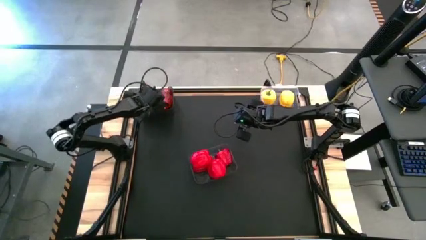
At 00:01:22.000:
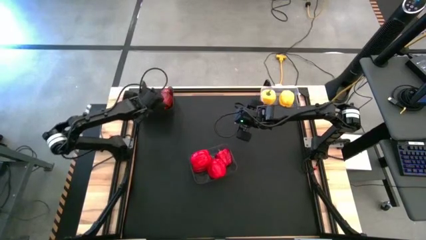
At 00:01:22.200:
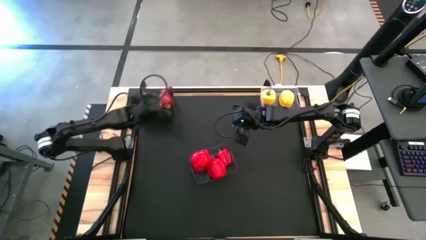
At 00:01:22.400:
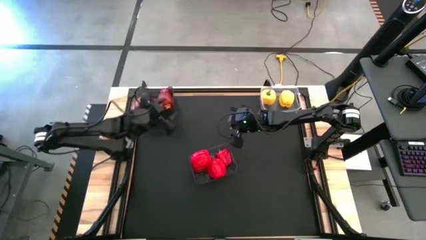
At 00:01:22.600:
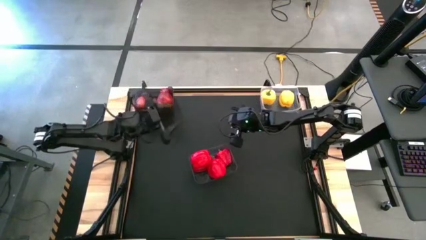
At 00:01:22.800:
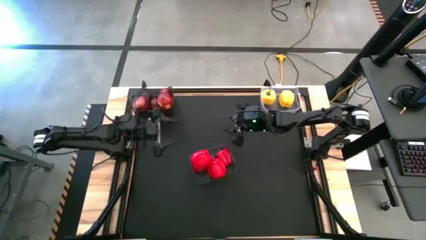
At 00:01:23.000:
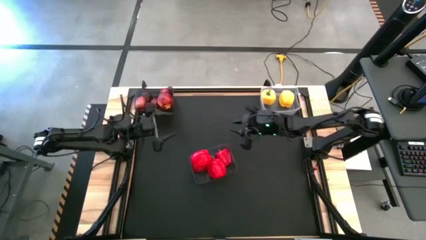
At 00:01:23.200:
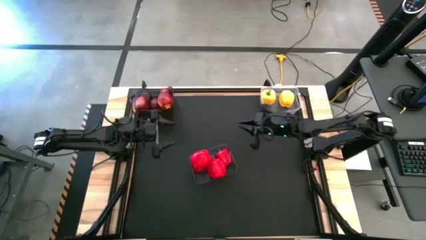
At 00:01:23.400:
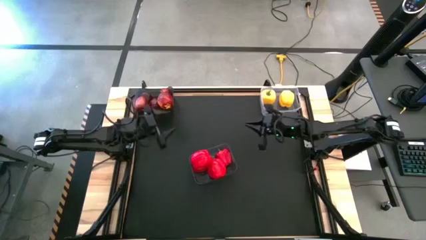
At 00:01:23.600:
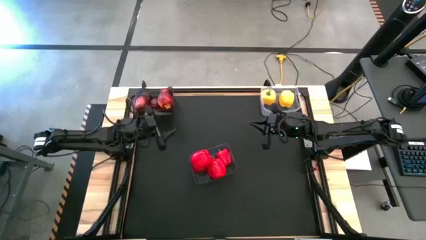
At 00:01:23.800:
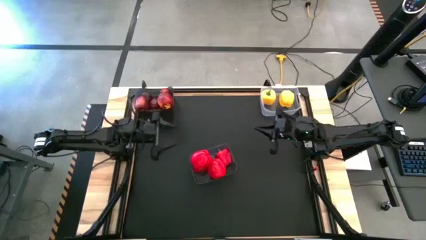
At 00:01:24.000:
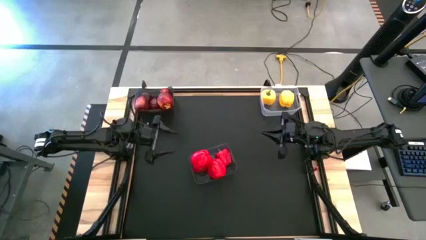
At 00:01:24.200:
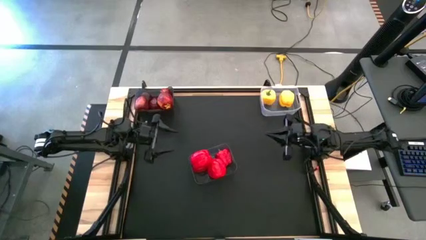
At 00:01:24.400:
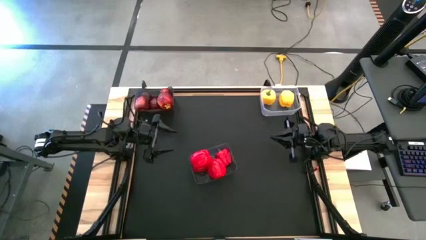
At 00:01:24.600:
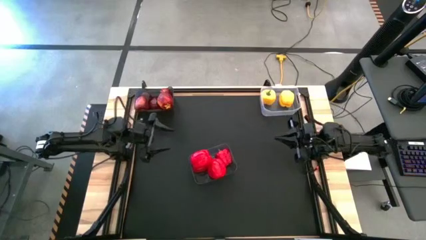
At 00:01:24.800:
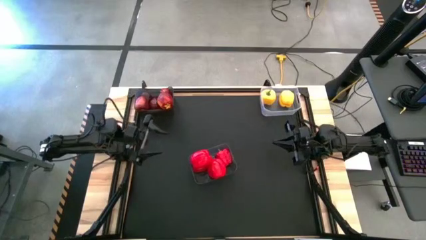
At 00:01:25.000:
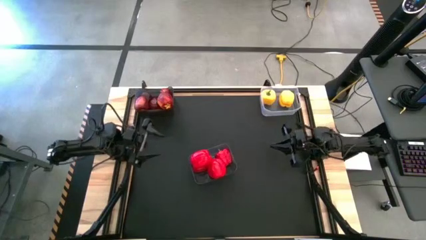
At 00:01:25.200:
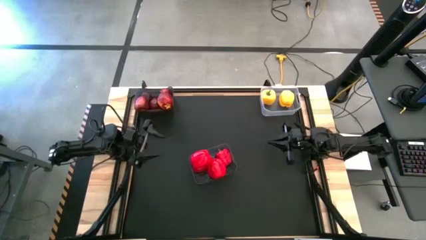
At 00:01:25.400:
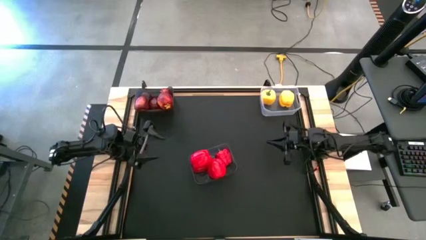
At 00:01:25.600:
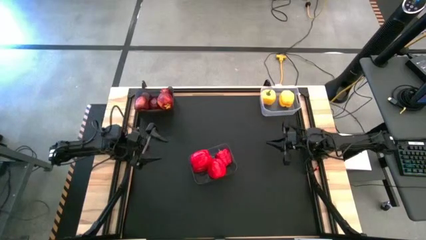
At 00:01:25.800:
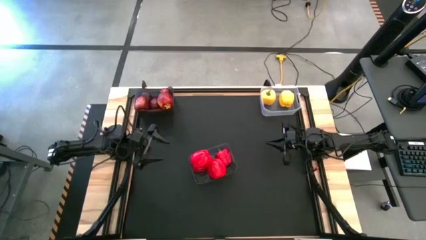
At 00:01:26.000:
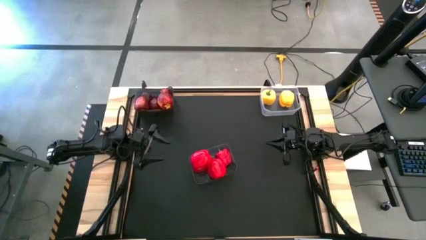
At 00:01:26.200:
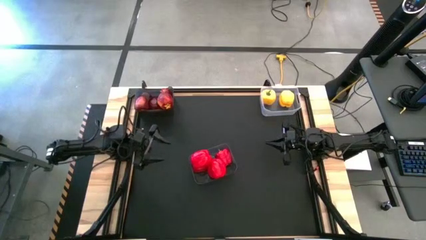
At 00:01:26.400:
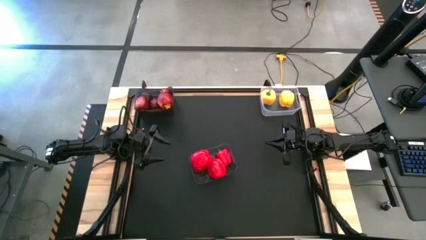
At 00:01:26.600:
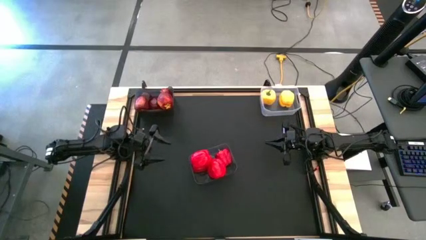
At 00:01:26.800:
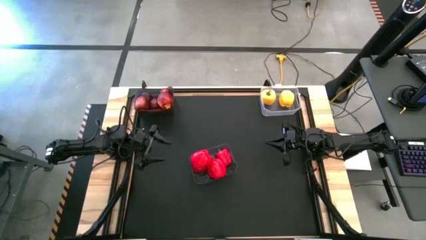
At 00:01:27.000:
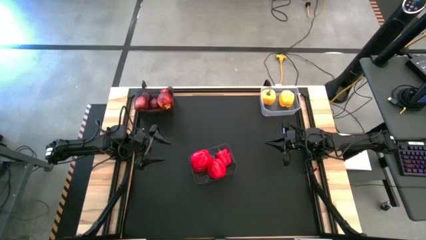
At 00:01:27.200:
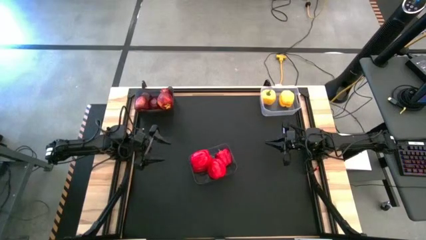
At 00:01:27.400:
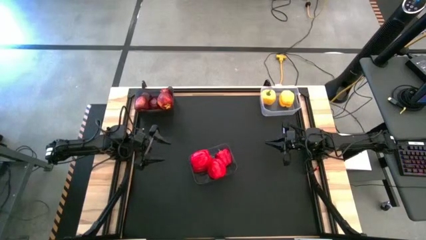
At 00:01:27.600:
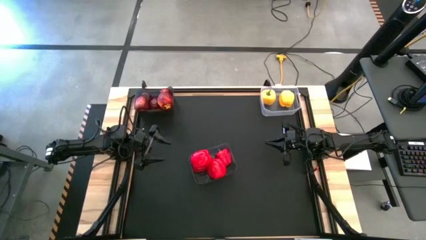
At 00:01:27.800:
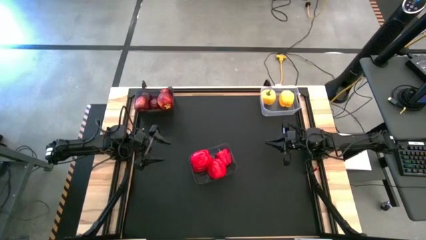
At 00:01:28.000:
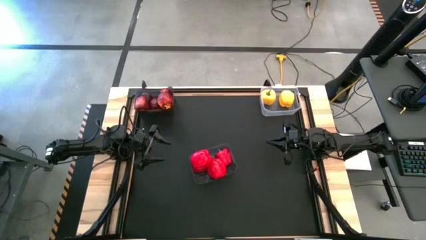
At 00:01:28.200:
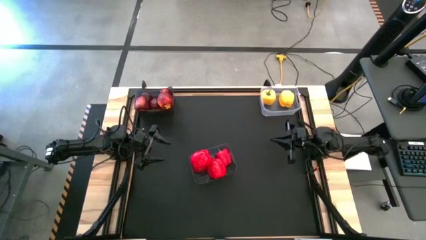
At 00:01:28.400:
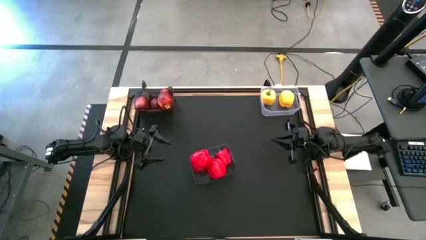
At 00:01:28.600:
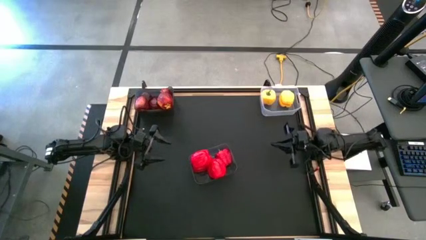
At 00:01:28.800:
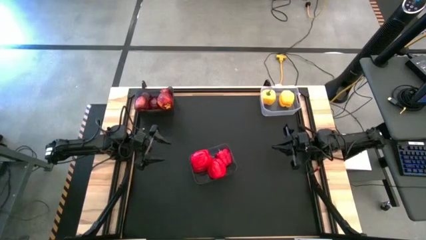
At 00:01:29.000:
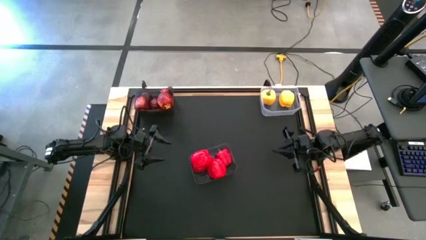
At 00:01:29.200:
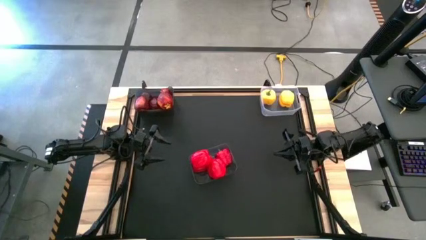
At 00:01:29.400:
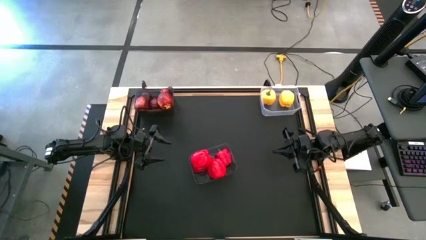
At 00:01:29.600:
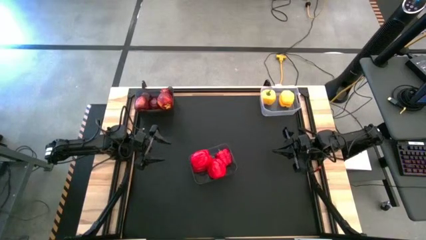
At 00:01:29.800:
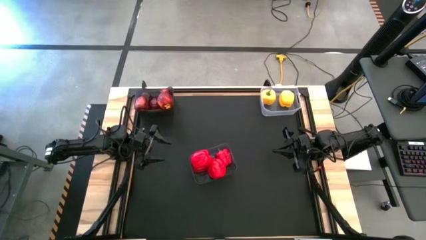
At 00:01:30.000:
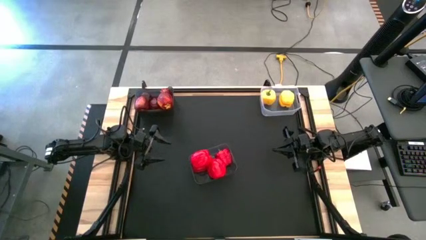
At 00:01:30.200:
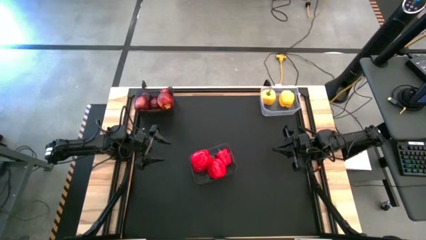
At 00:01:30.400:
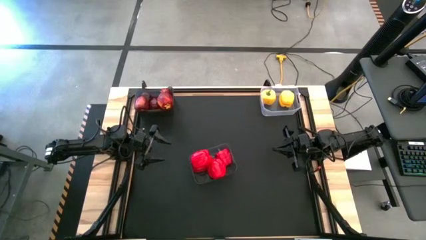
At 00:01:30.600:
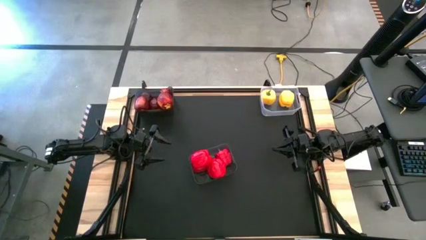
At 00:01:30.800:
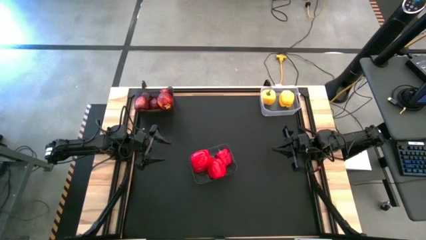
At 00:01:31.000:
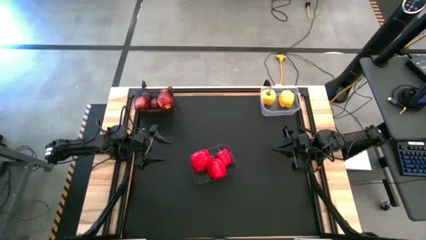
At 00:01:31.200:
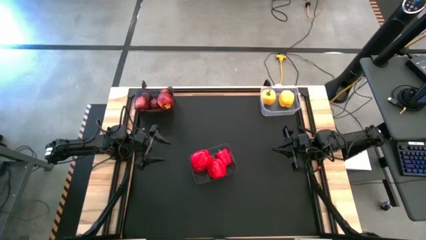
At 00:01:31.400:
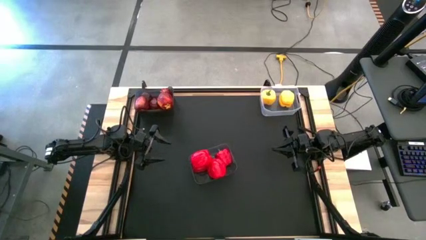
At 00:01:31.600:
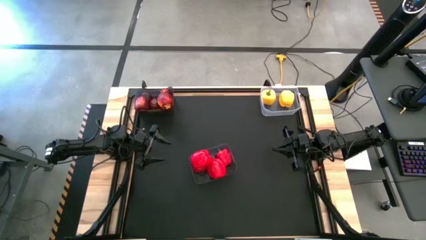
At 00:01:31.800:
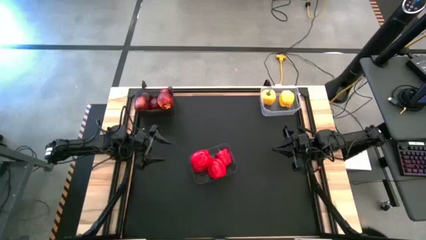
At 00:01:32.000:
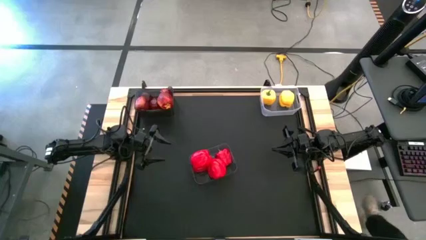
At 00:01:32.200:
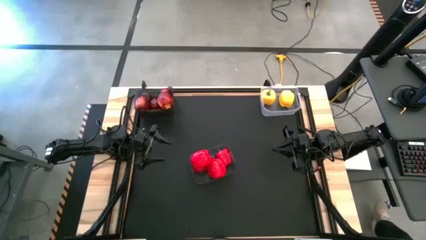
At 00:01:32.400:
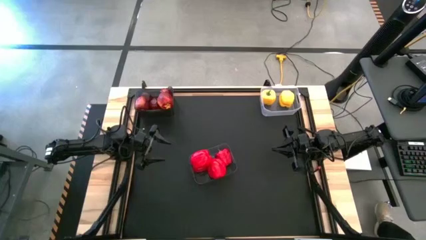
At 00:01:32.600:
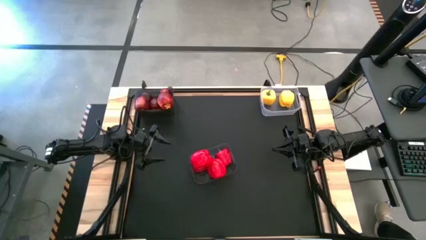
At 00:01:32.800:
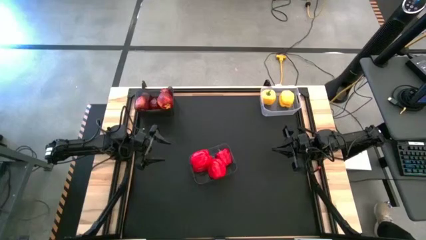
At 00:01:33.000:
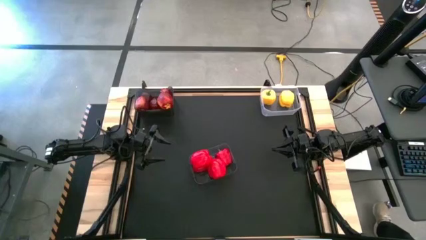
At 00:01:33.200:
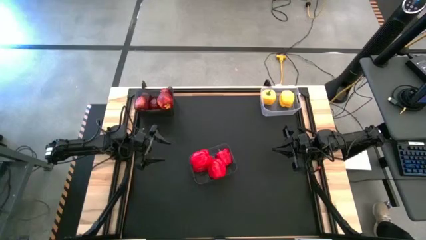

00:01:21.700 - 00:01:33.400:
Task: Sort produce into baskets
Return to Home Position

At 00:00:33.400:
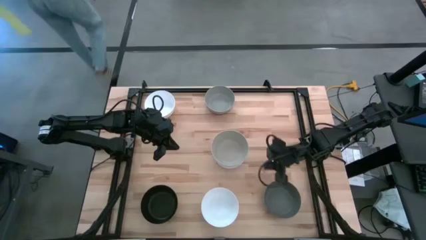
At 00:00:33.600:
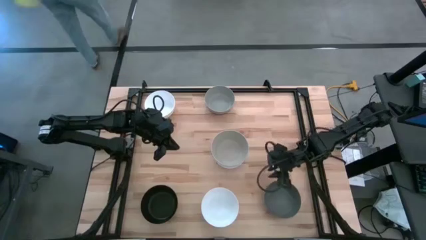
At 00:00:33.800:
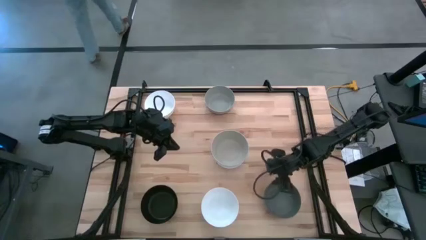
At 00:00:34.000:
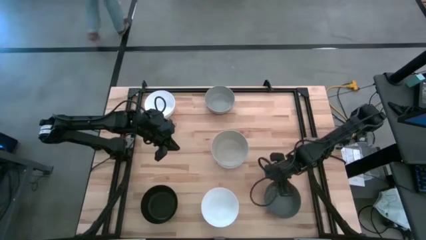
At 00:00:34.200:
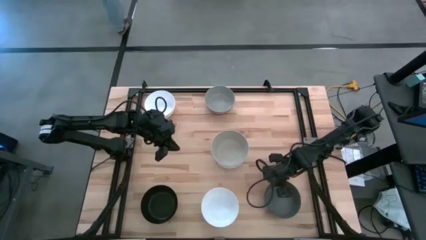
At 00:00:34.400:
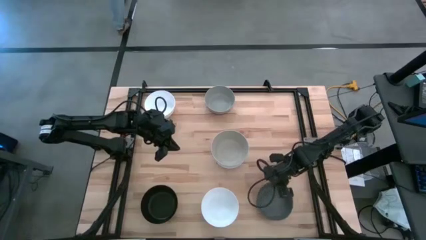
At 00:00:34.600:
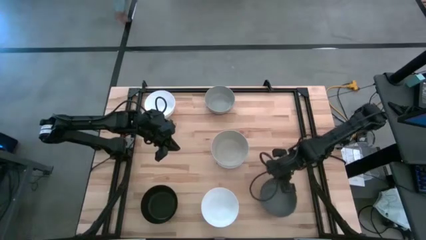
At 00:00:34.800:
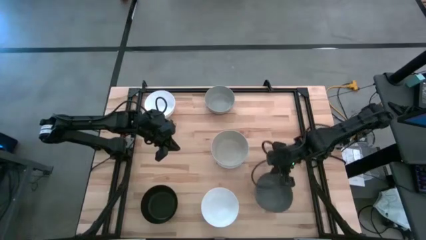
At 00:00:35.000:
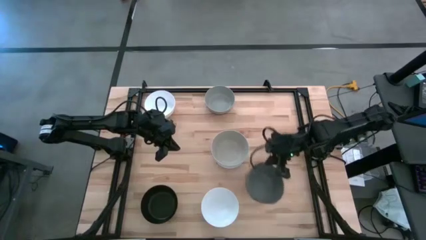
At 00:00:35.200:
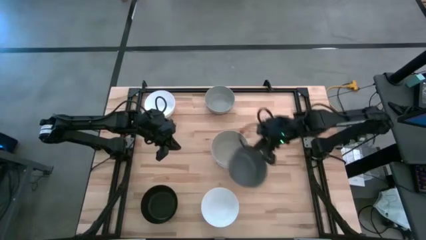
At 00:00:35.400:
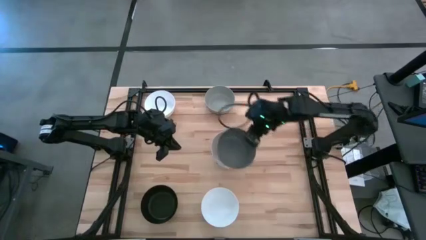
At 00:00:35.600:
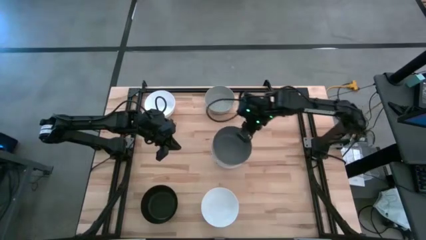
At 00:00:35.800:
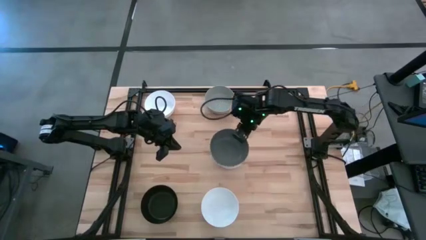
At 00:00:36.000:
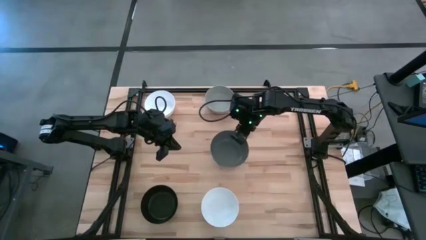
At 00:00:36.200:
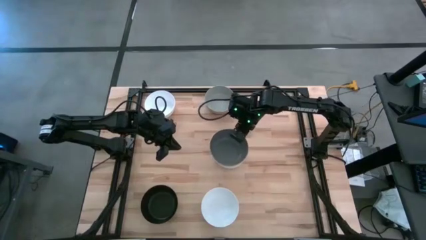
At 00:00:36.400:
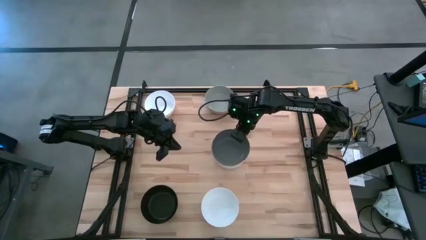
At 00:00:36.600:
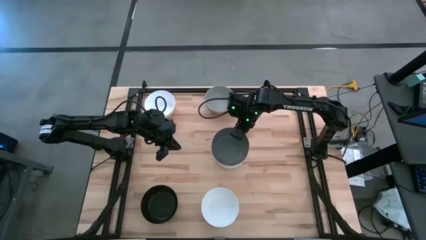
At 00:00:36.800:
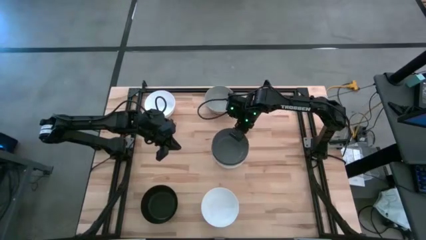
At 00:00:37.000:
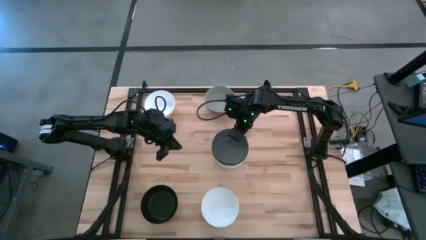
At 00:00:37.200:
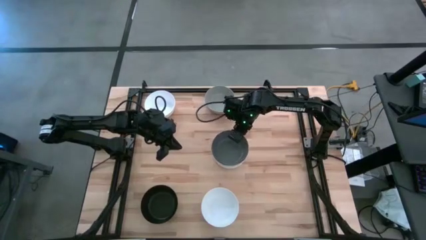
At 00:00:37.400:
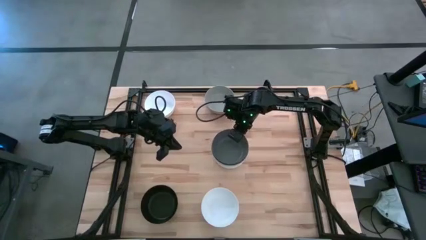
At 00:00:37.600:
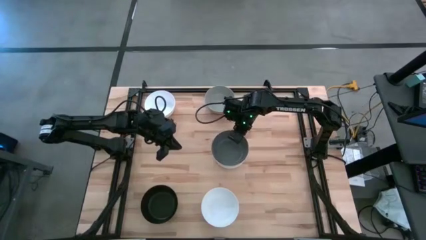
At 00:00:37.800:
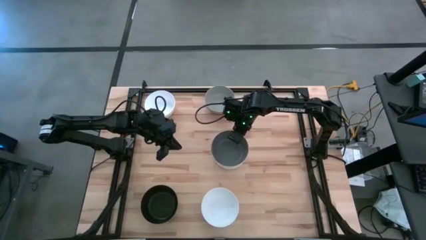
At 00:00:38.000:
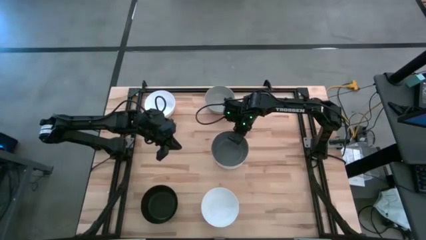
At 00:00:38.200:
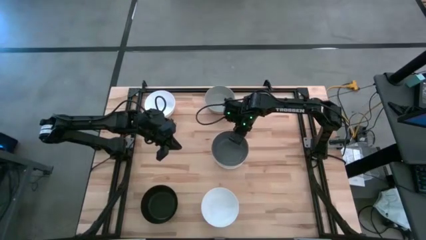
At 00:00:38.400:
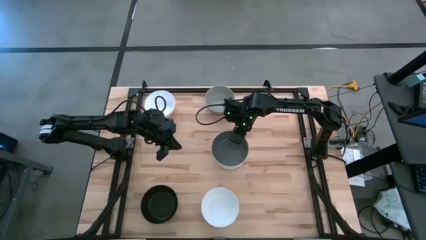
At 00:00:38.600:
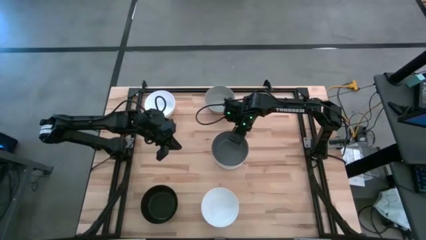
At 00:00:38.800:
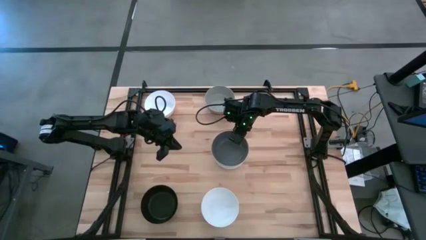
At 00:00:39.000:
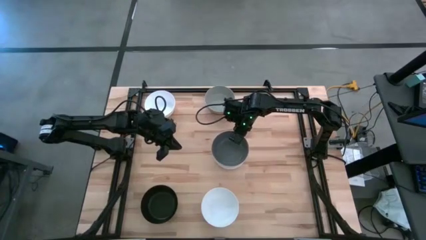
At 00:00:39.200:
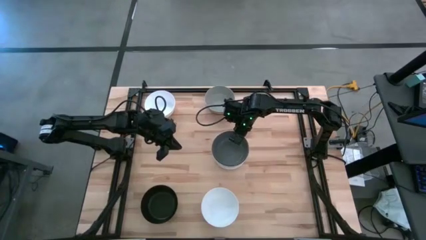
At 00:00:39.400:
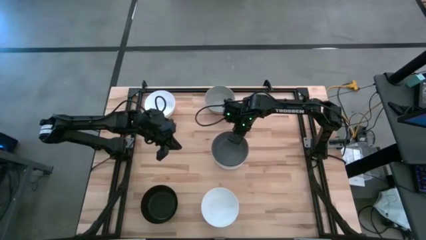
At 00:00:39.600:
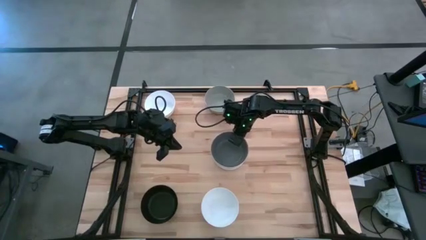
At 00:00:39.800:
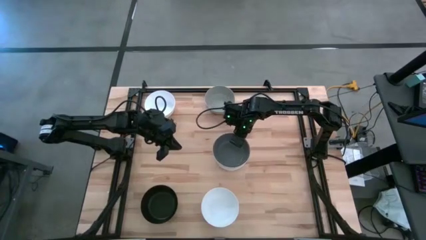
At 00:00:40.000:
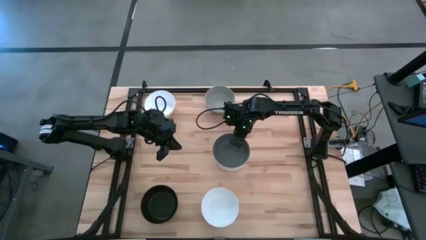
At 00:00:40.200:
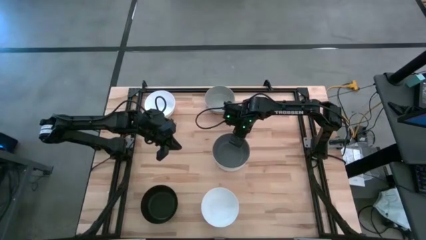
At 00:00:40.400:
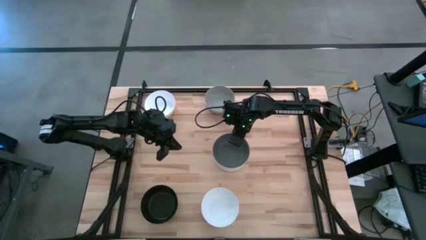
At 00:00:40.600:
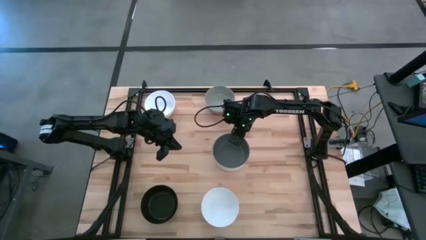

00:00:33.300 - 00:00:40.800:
Task: Nest bowls inside each other
Stack the dark gray bowl on the brown bowl
